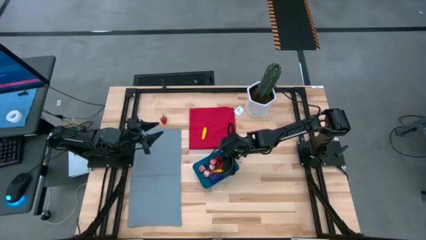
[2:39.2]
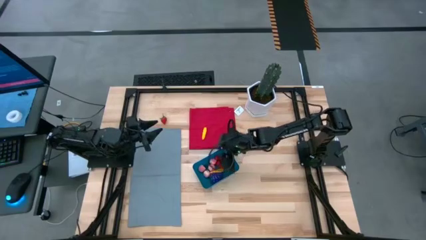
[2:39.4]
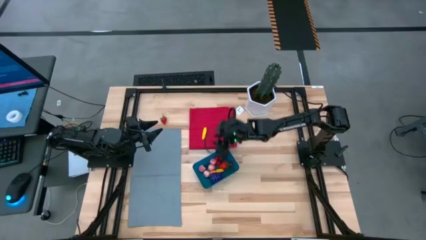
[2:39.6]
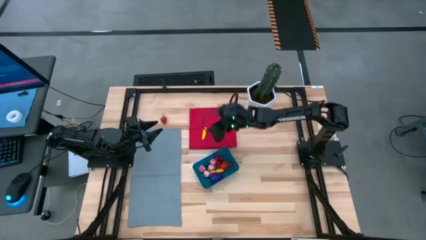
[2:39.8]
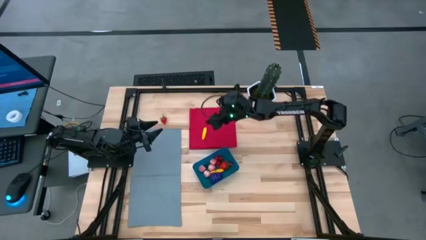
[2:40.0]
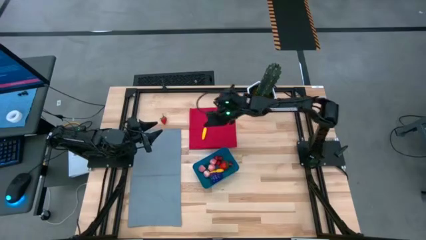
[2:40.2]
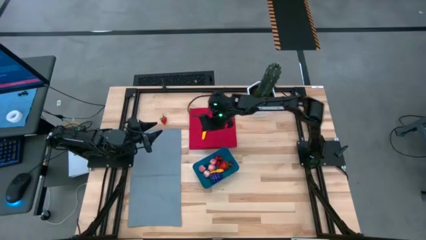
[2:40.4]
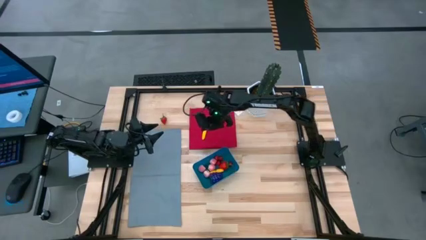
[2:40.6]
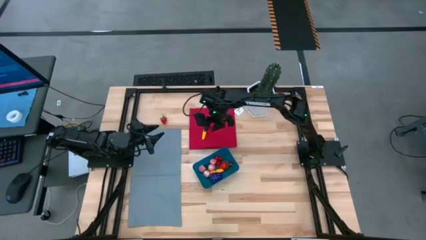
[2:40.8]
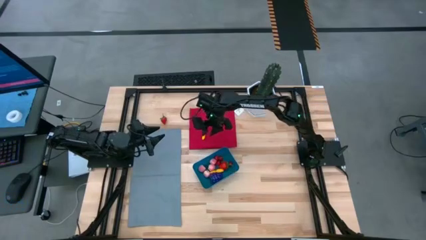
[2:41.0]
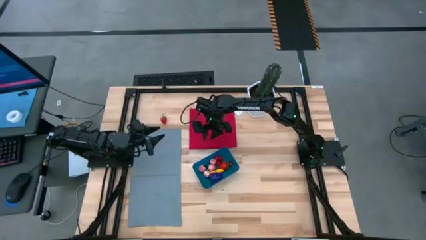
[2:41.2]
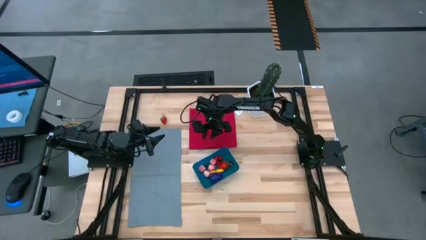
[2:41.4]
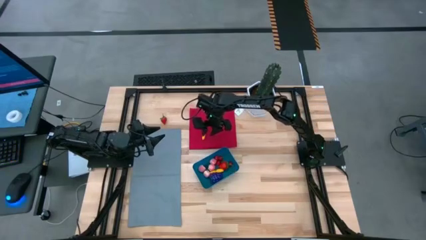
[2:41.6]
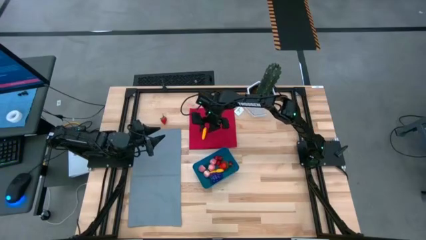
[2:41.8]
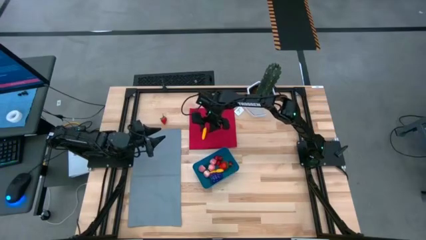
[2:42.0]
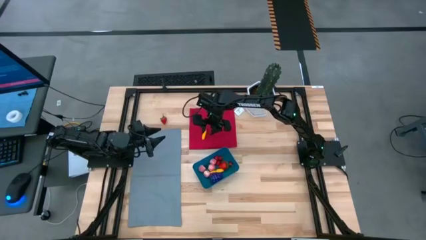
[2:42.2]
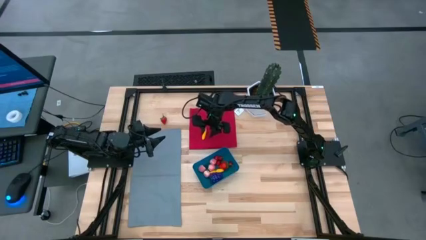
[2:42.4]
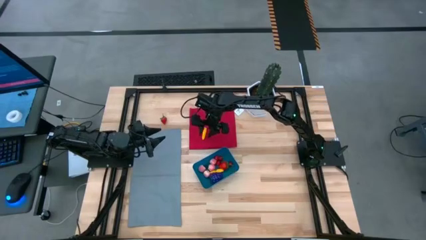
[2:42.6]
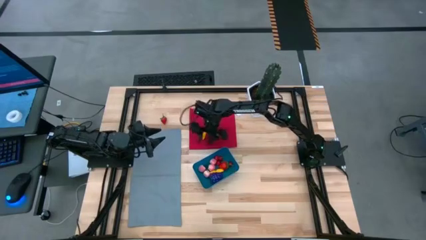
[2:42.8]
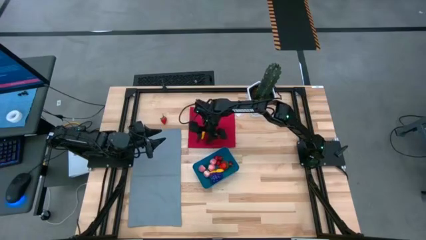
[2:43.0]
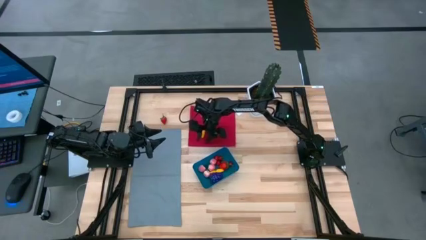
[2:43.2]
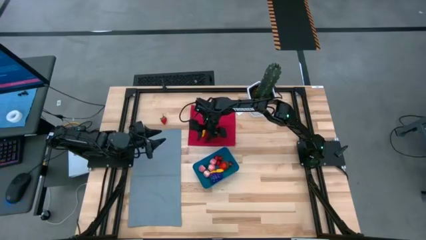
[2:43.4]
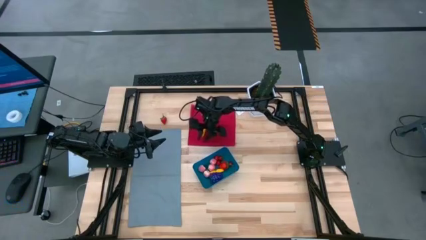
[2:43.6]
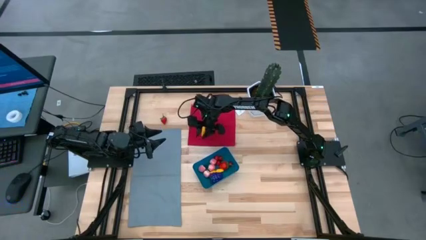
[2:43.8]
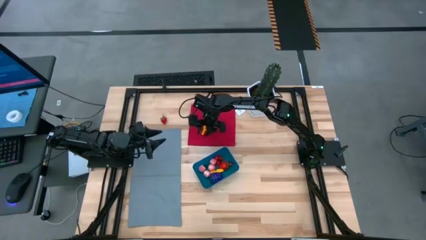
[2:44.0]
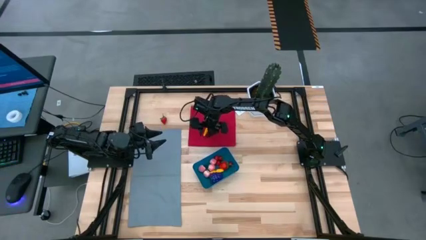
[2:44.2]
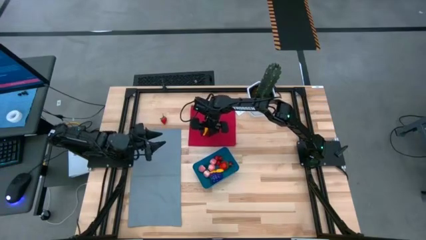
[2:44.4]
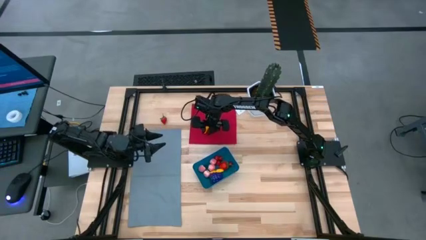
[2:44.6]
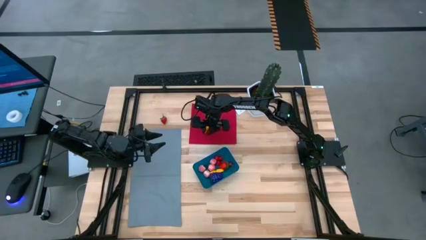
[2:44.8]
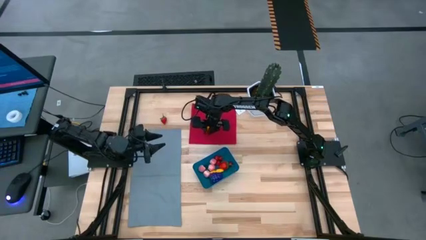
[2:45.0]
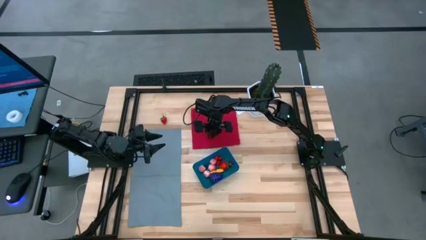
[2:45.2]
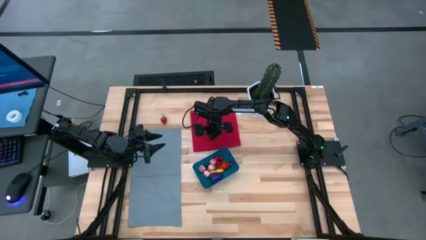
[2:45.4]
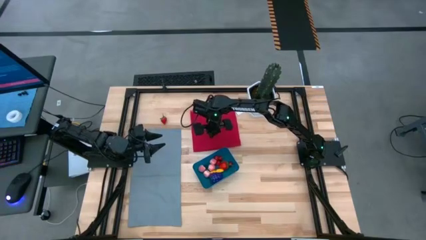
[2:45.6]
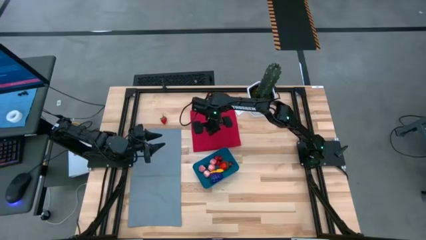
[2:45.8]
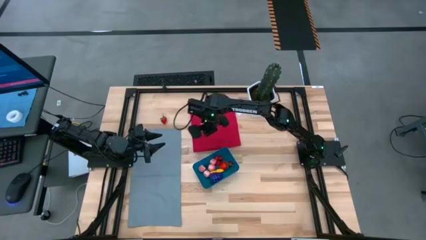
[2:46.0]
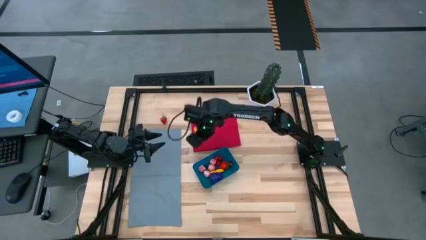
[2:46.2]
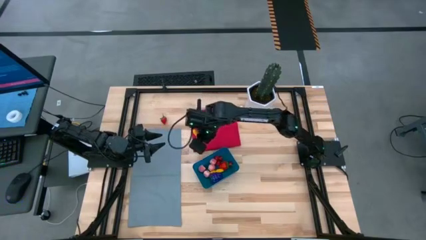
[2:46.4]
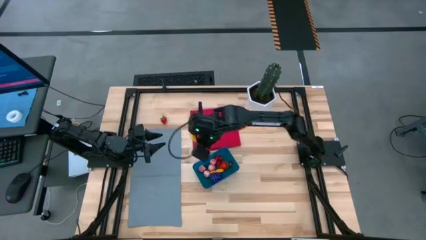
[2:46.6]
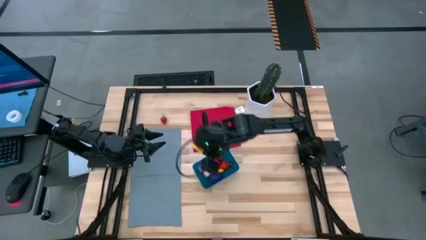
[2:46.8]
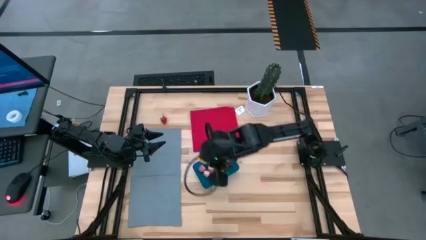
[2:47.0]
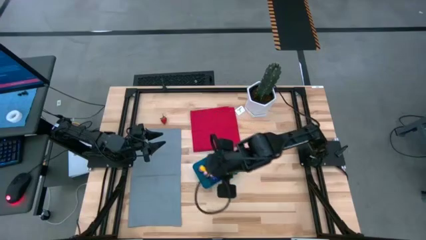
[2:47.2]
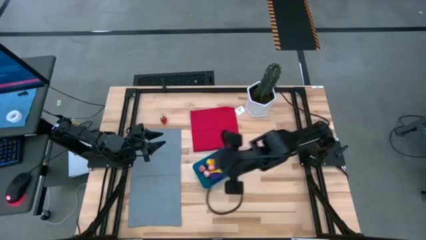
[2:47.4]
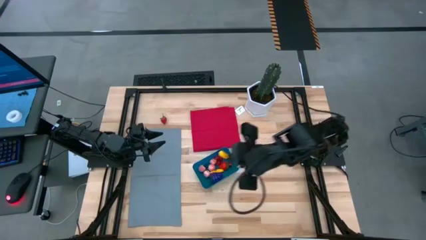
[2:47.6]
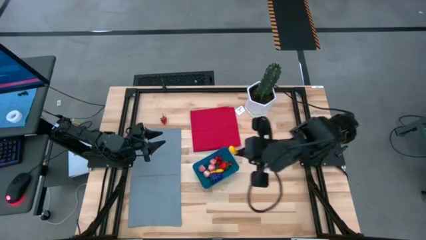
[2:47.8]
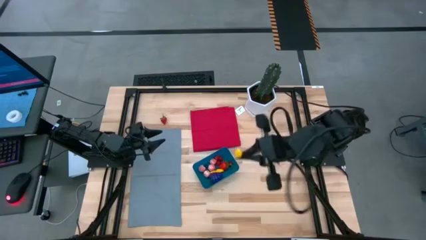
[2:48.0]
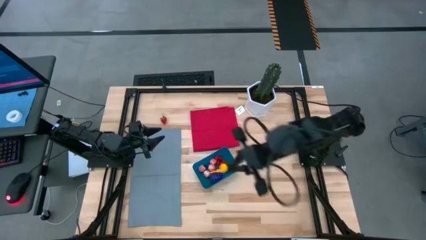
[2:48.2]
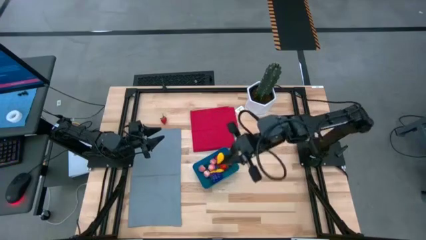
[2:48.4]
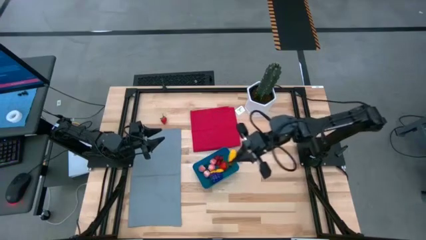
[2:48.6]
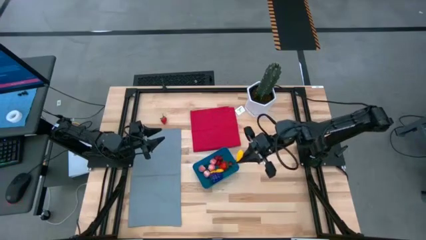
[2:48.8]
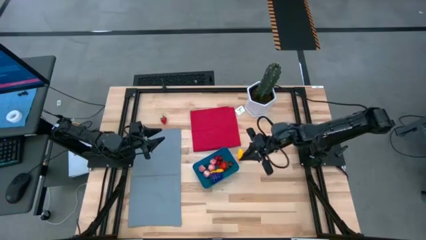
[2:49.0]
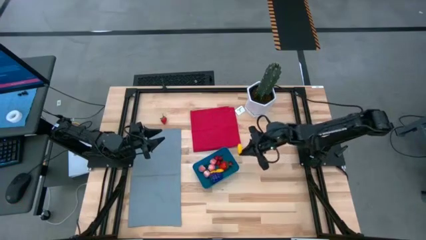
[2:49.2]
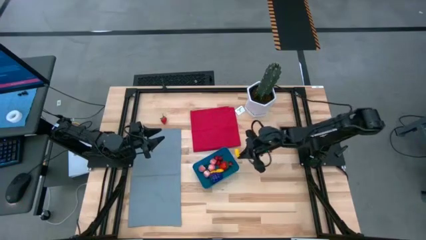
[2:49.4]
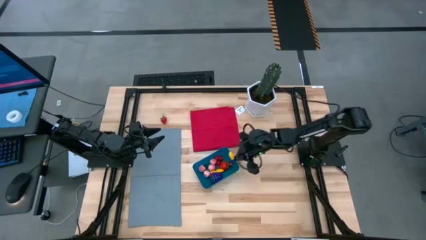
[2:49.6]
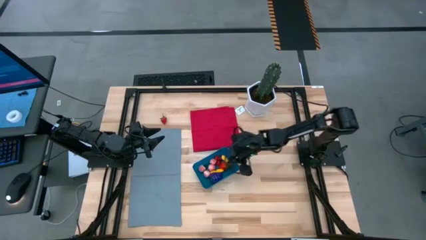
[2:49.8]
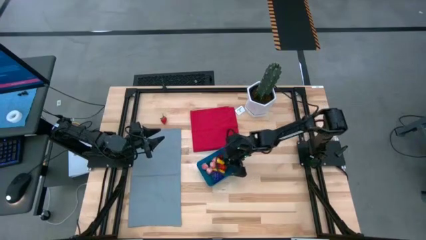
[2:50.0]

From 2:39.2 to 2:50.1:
Task: Pick and placing Produce into tupperware
Put the corn into the blue bin

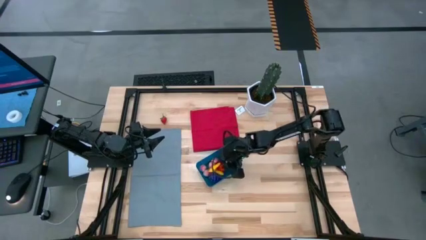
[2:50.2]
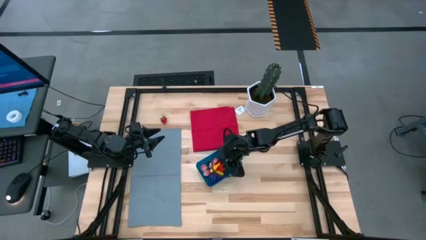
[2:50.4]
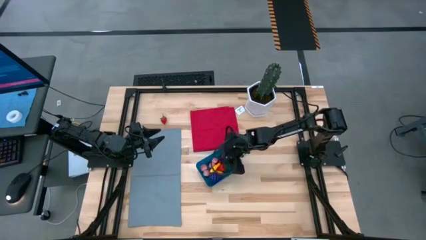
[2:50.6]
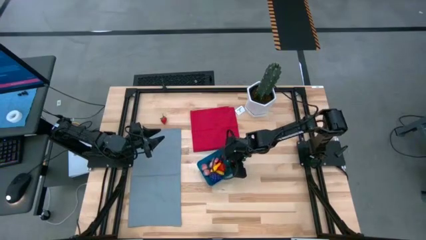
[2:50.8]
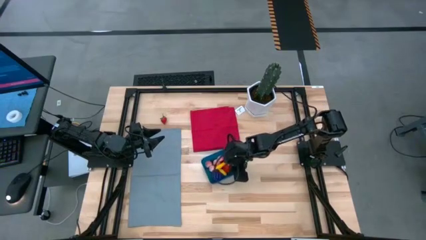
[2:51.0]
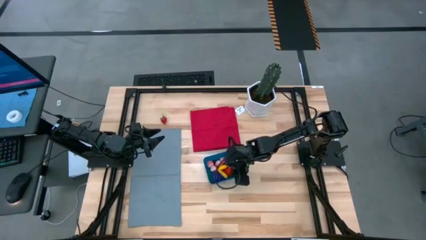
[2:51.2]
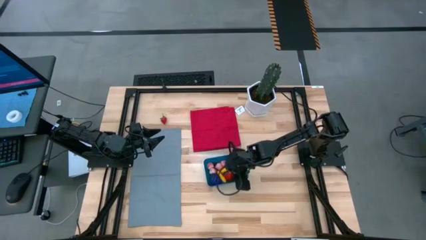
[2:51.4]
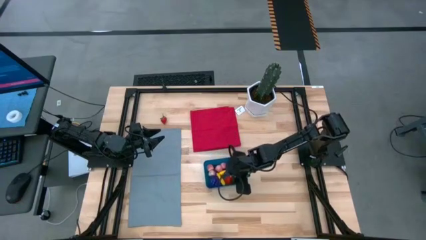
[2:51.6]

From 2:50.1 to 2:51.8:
Adjust the blue bin
